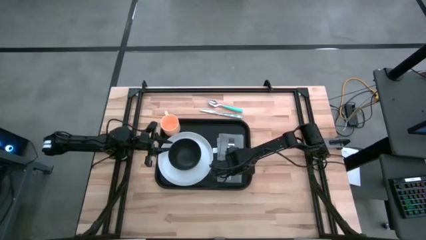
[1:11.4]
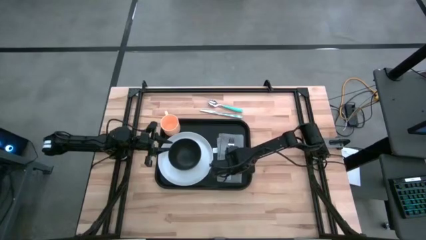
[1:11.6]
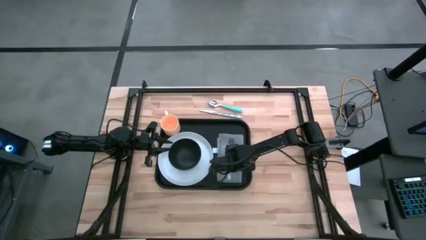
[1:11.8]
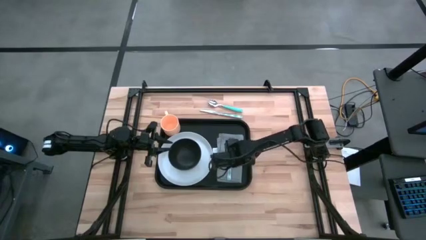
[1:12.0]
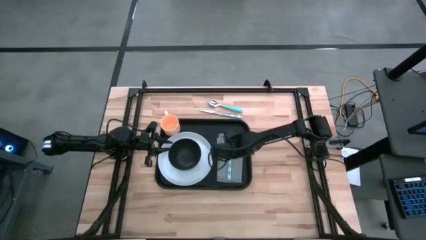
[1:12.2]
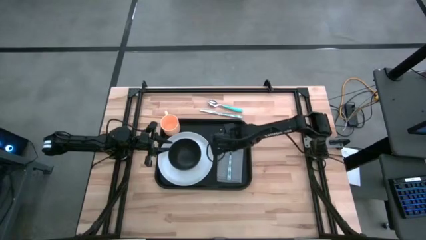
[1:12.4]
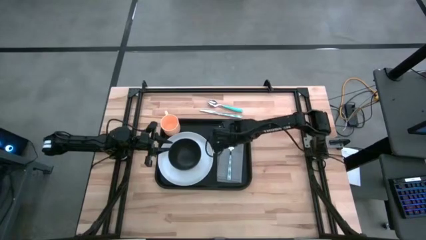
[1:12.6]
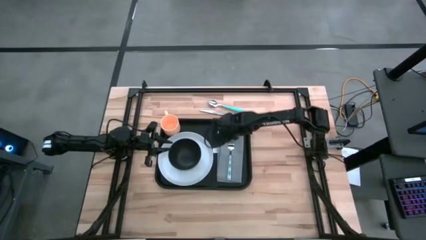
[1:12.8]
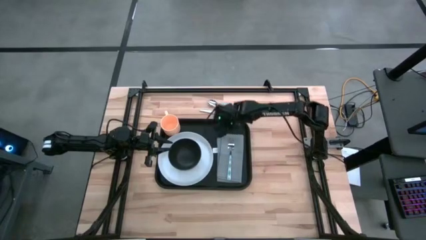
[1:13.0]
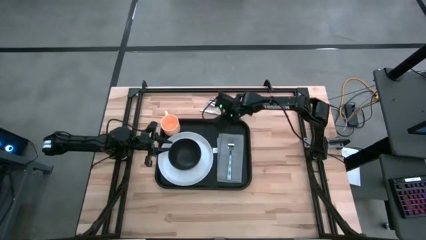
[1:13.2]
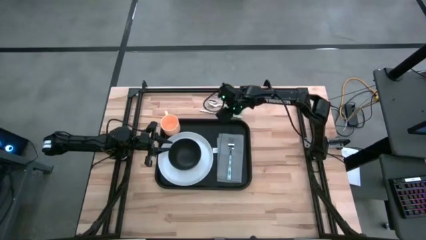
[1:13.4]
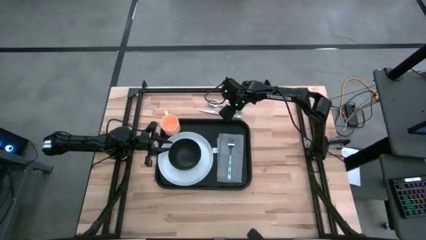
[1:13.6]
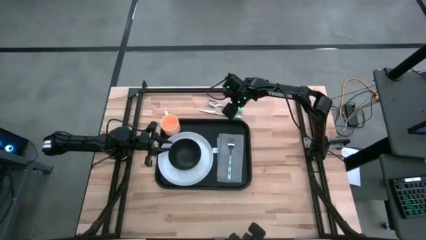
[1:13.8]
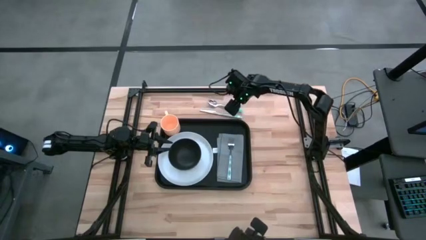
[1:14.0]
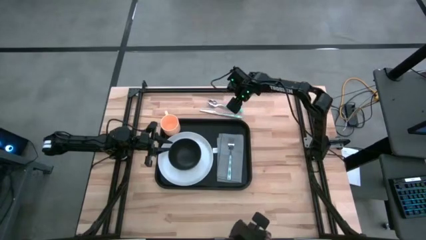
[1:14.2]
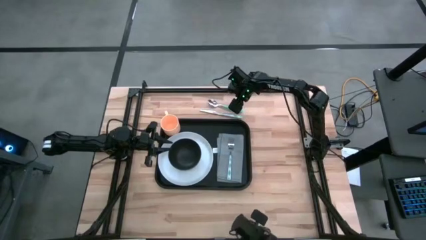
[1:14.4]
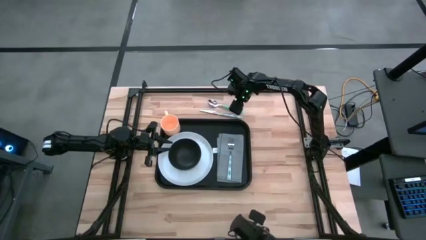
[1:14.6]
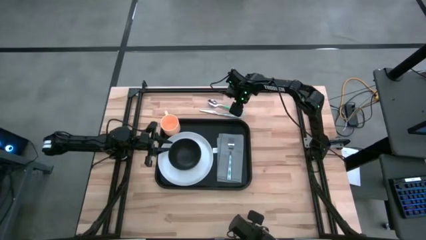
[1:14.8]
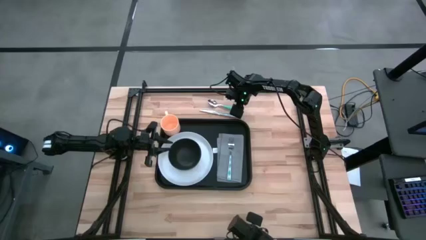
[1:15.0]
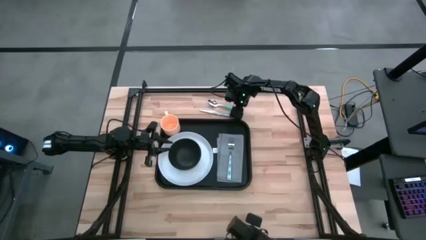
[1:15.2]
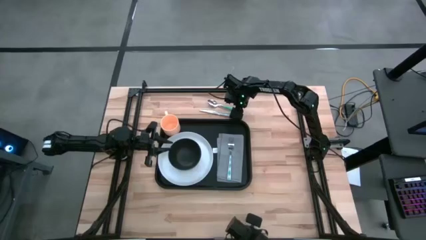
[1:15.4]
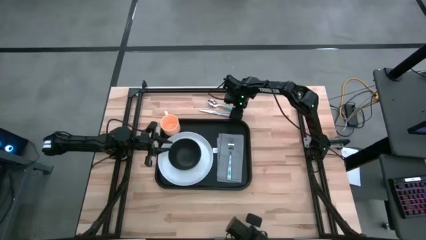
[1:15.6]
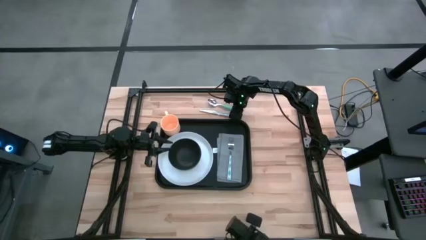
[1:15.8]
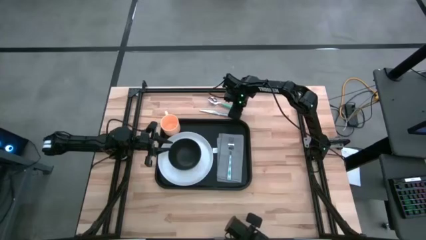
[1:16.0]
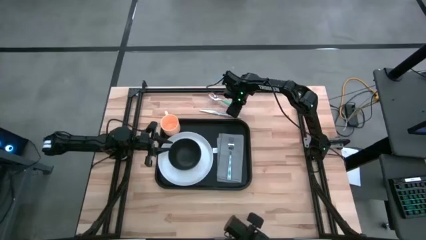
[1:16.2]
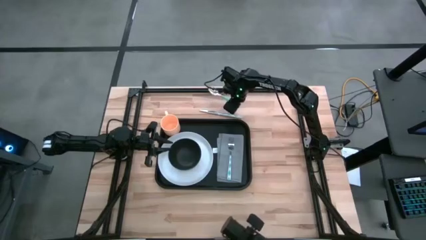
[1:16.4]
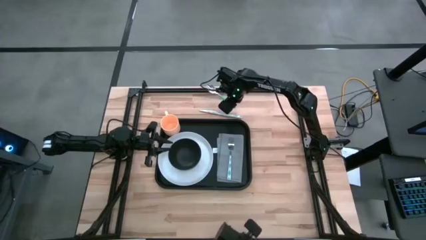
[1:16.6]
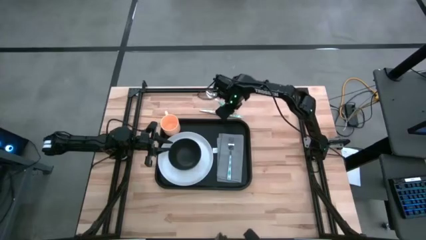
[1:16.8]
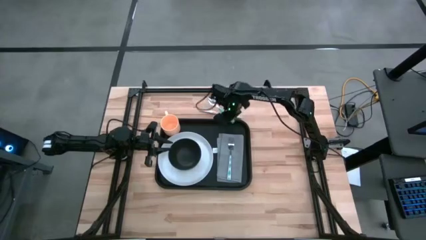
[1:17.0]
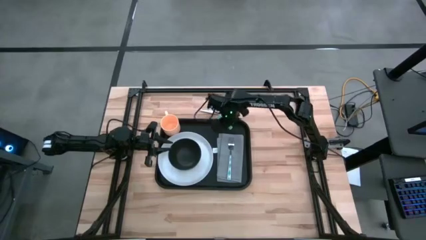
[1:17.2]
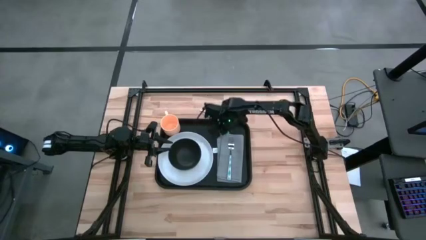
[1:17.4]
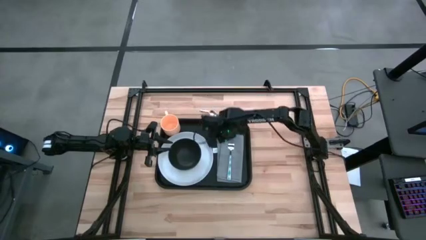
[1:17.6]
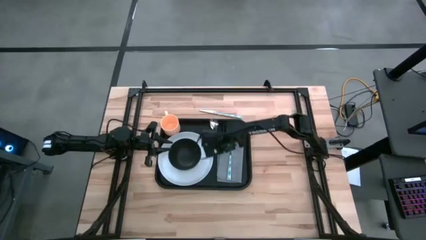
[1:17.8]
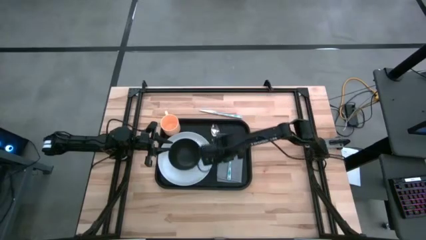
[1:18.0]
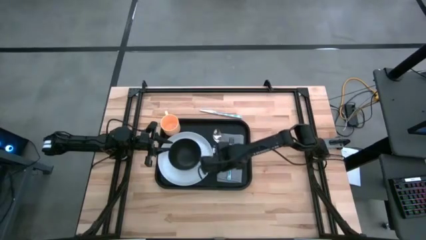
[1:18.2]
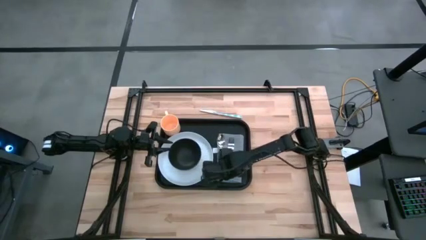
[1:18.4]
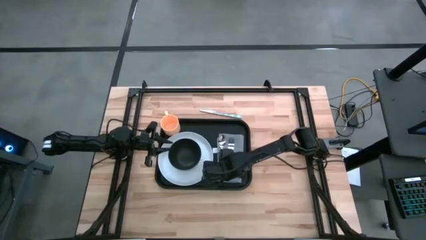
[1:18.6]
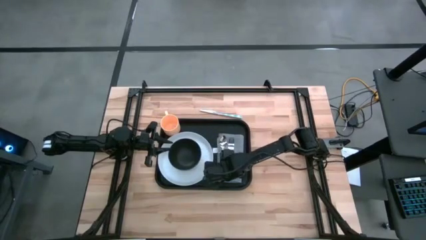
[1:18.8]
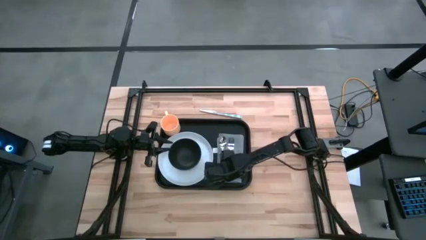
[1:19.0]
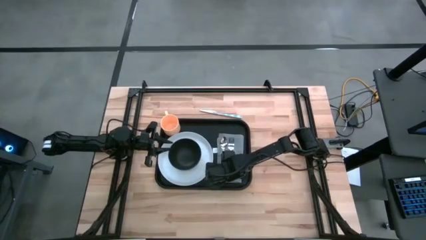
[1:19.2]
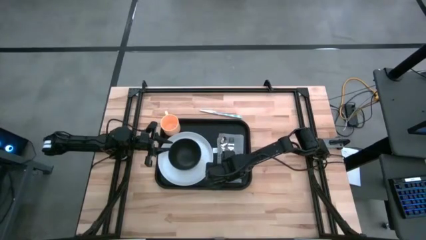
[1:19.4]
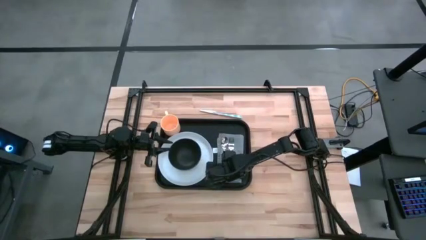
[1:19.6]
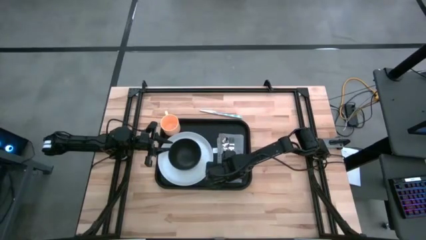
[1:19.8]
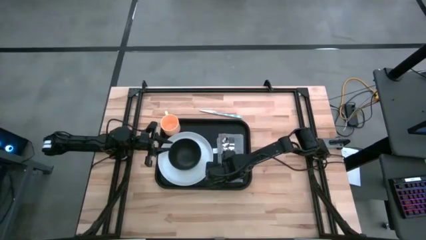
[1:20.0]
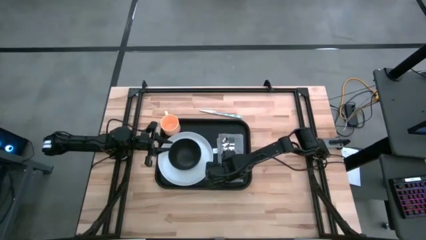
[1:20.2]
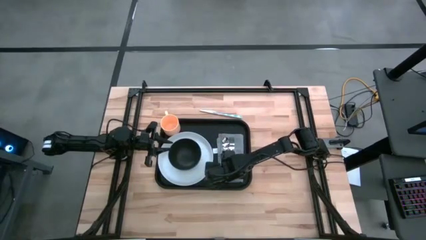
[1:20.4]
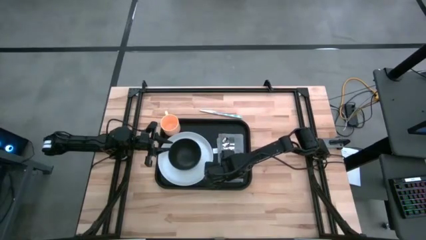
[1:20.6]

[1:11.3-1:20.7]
Task: Set up tray
Put the blue spoon on the gray tablecloth on the black table tray to the left of the blue fork

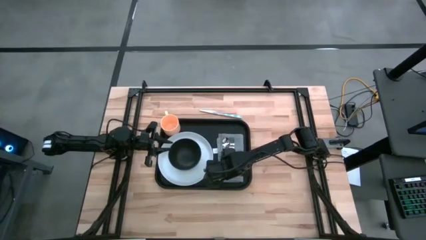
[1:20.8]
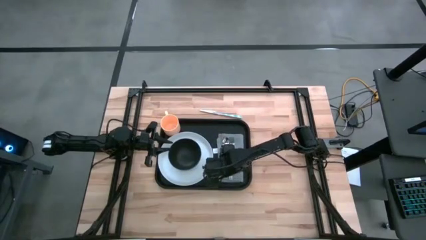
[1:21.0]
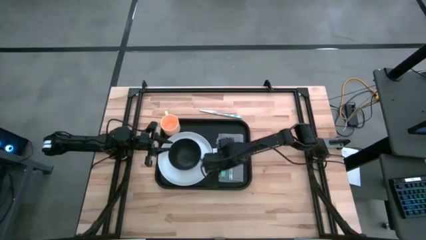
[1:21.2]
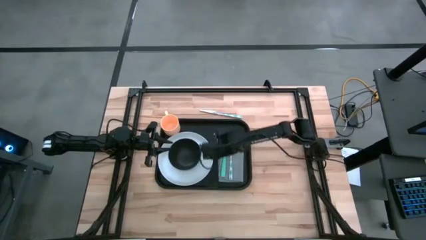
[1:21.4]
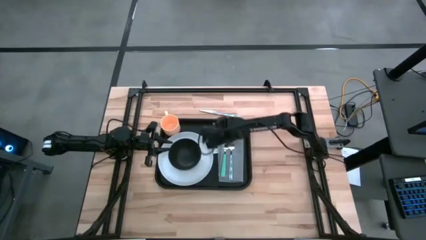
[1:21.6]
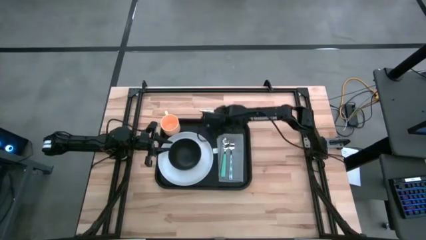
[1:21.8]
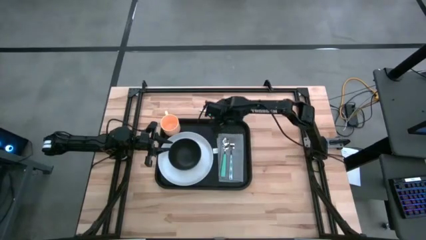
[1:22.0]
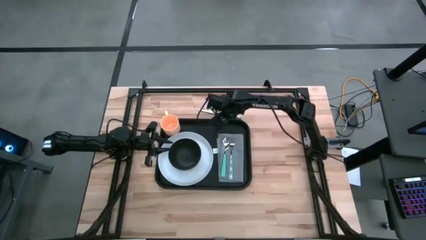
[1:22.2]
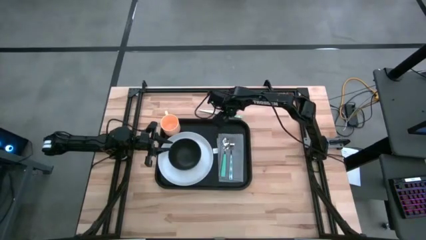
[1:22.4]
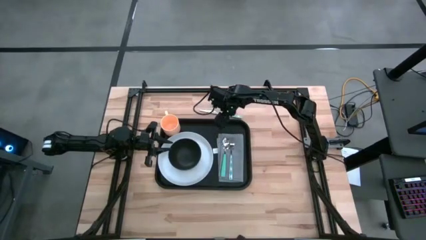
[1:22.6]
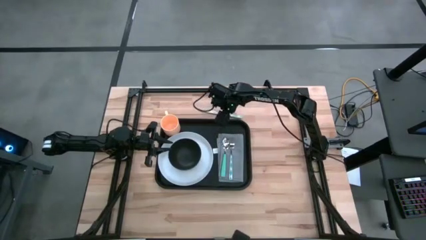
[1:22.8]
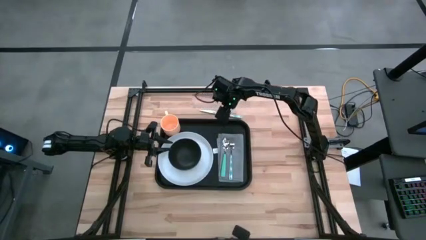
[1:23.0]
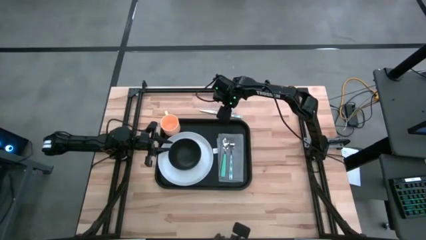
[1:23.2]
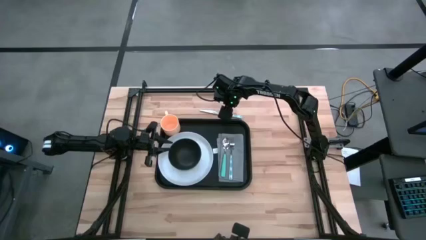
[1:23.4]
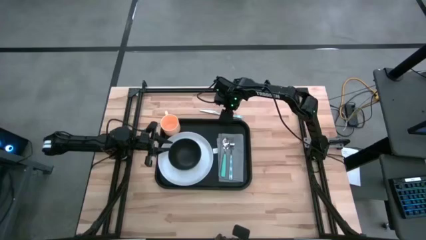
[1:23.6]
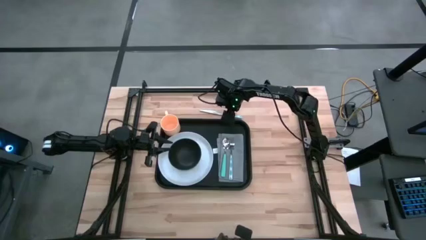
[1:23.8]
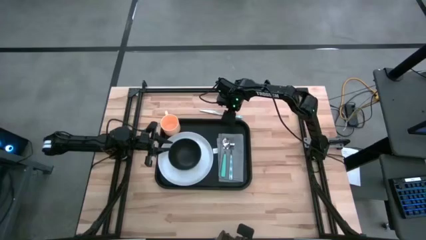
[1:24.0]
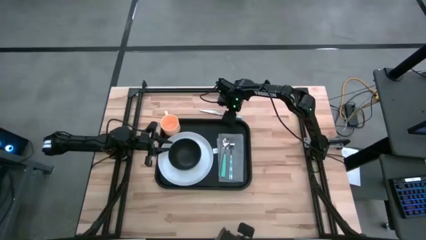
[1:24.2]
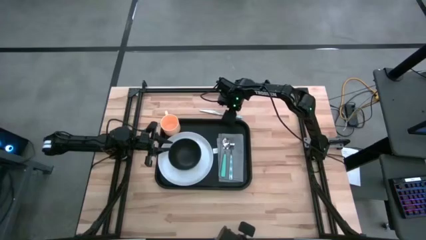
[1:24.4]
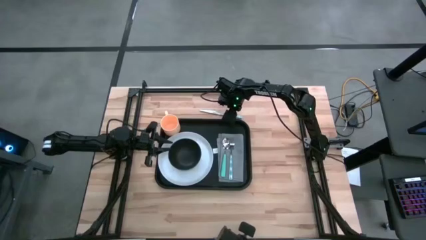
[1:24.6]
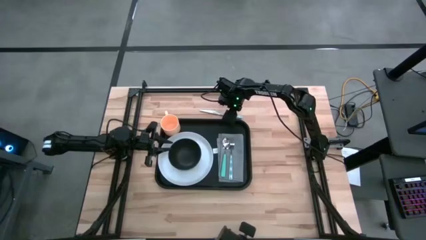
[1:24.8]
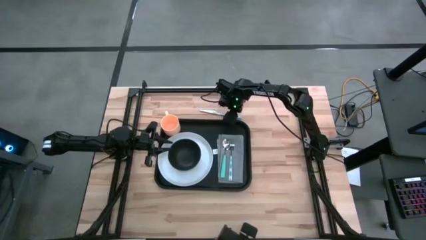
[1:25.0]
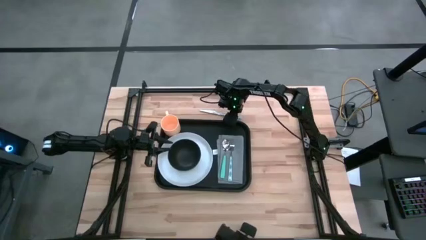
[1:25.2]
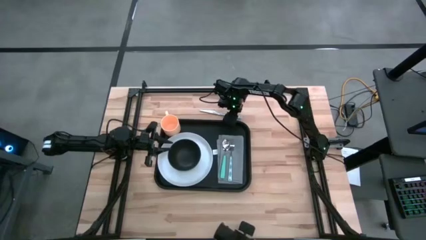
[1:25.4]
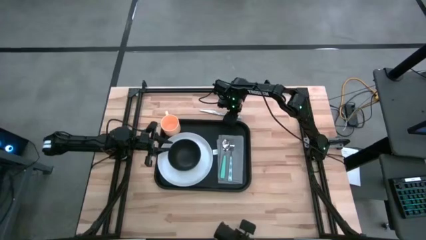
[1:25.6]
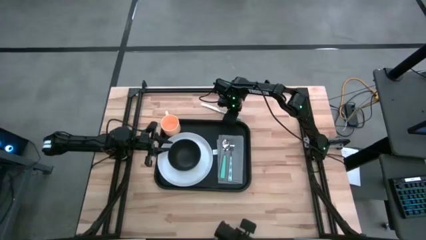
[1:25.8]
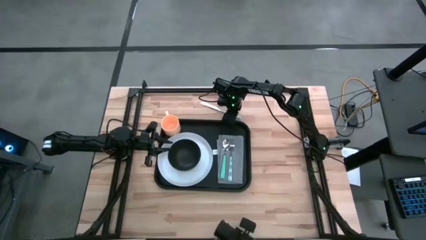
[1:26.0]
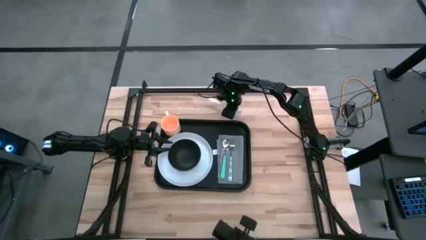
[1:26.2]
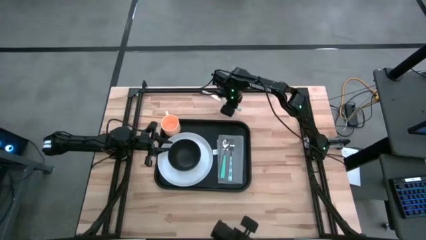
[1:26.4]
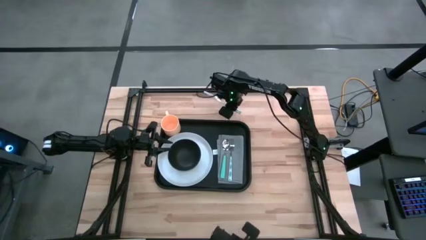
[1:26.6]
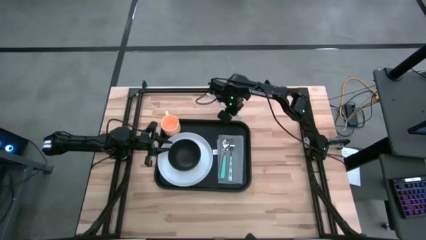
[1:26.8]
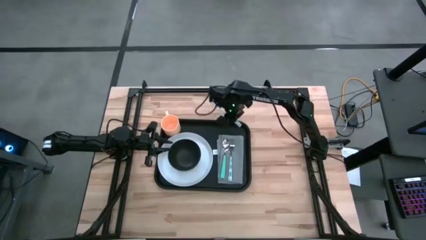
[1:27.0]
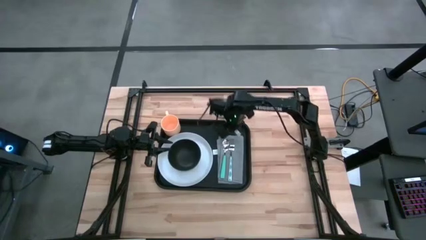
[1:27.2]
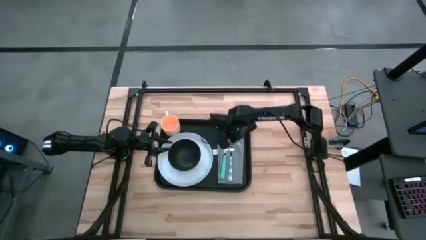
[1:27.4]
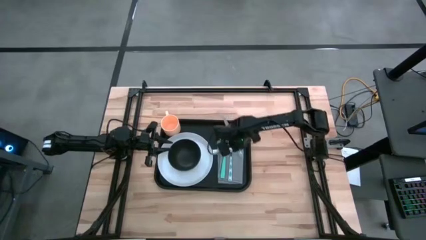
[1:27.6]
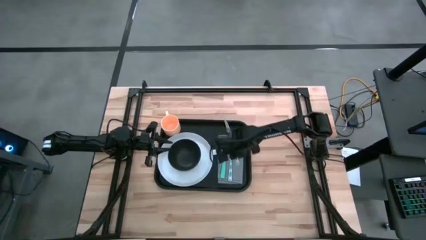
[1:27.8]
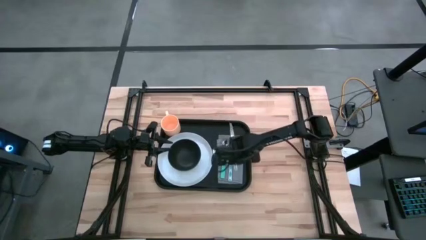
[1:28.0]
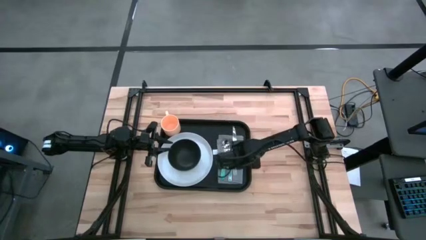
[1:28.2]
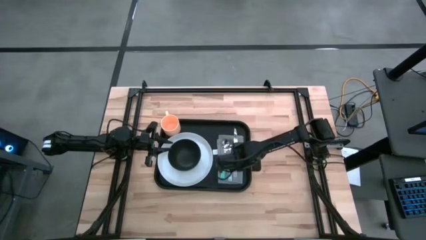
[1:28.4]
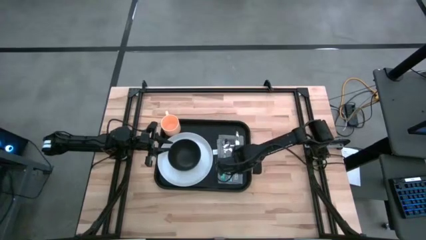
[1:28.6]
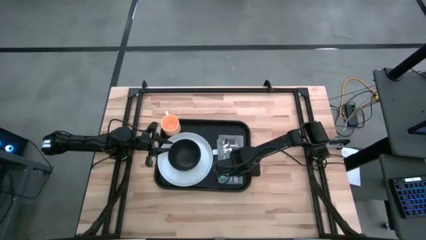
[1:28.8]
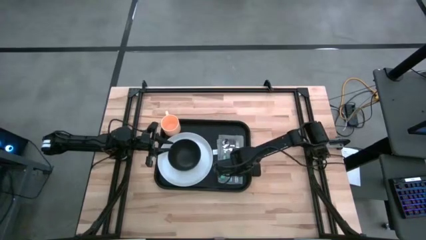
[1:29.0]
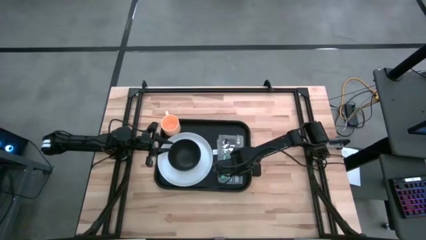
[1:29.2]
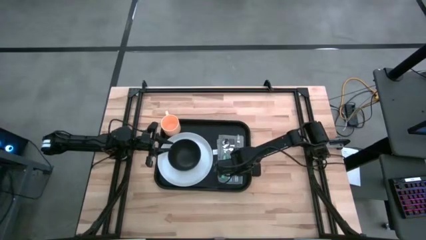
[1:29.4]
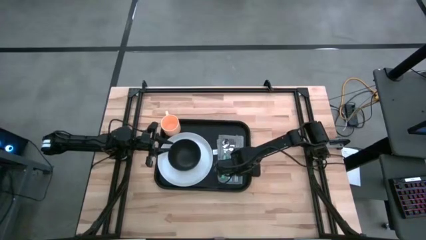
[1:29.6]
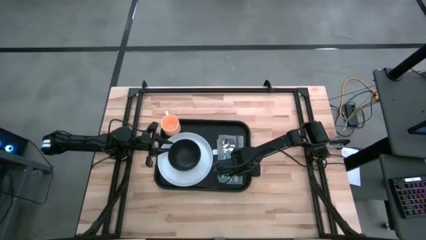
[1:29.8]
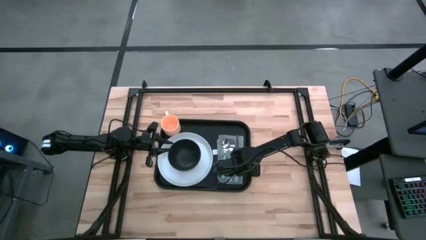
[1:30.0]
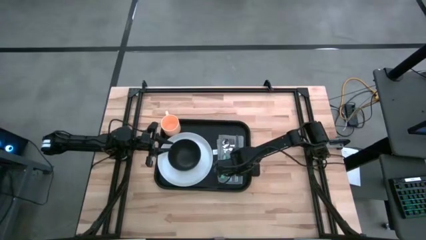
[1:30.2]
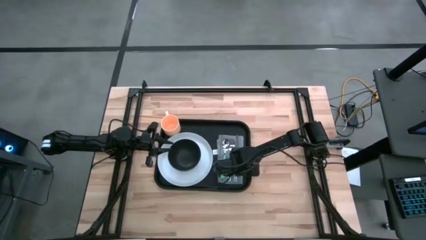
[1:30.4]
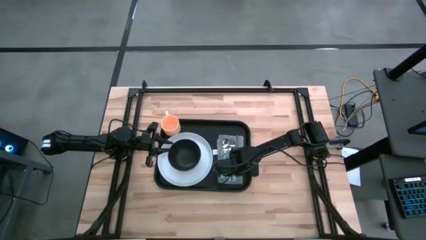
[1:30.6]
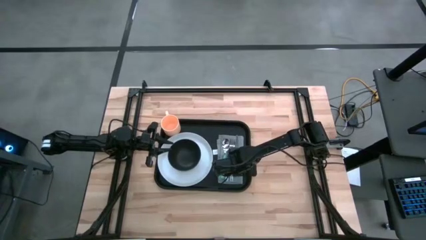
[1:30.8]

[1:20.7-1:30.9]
Put the blue knife on the gray tablecloth on the black table tray to the right of the blue fork
